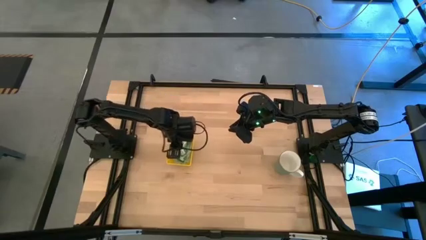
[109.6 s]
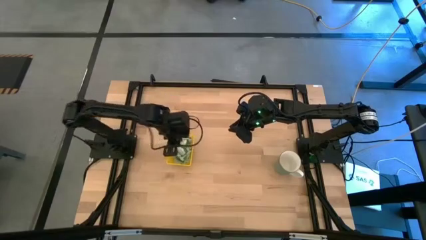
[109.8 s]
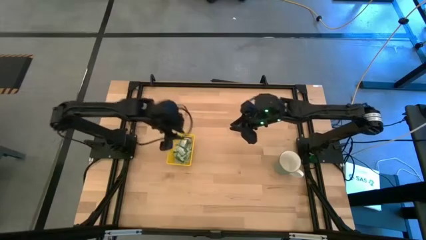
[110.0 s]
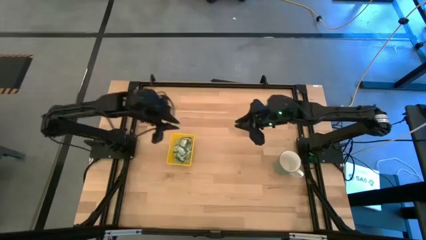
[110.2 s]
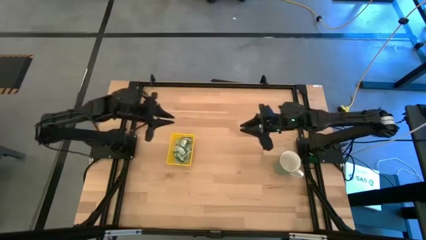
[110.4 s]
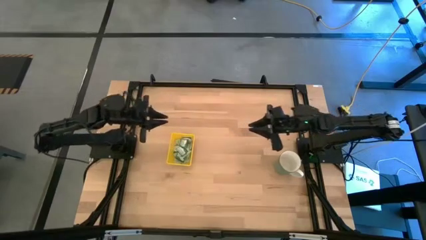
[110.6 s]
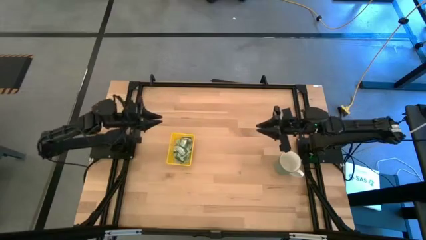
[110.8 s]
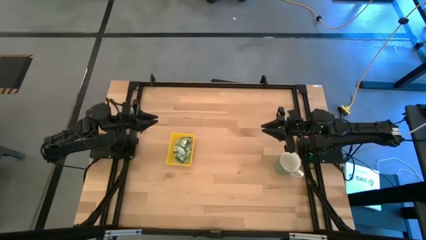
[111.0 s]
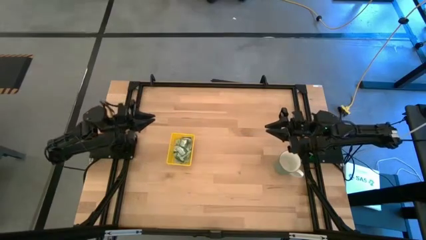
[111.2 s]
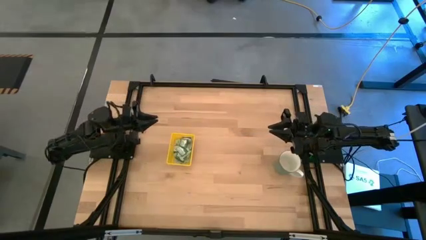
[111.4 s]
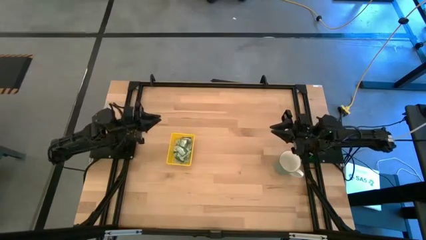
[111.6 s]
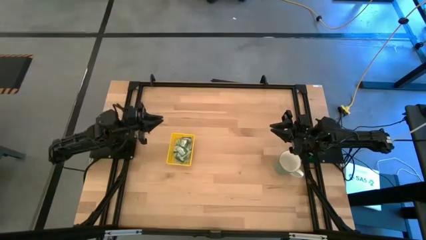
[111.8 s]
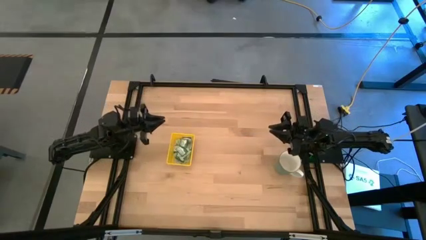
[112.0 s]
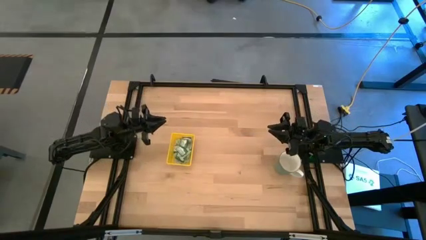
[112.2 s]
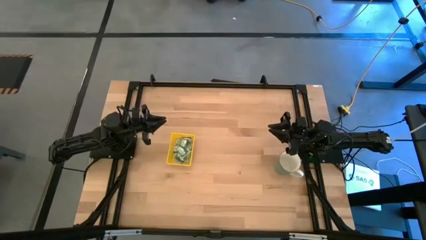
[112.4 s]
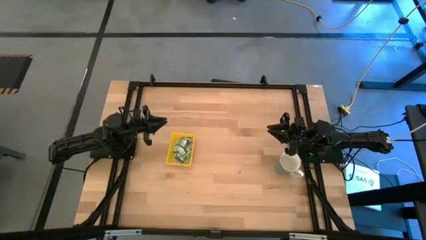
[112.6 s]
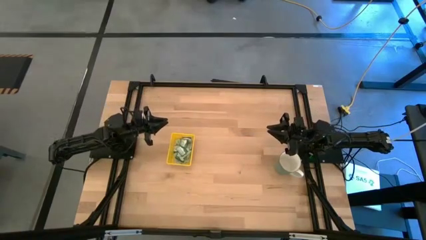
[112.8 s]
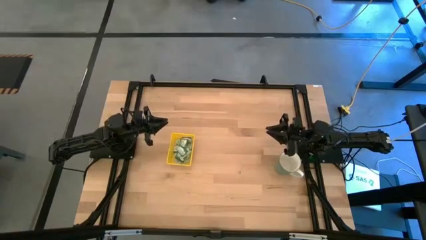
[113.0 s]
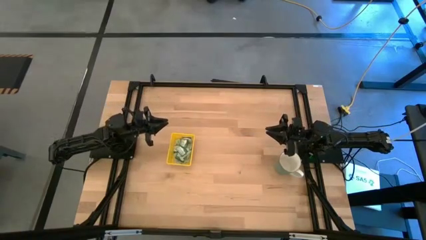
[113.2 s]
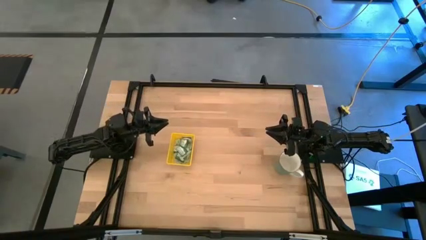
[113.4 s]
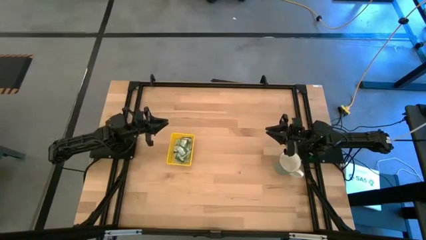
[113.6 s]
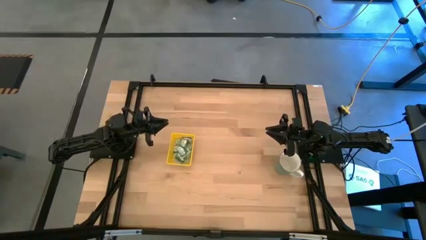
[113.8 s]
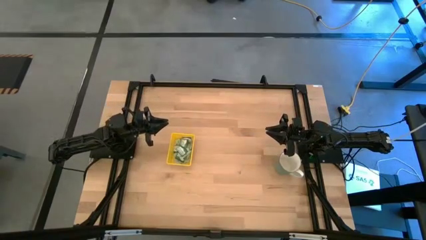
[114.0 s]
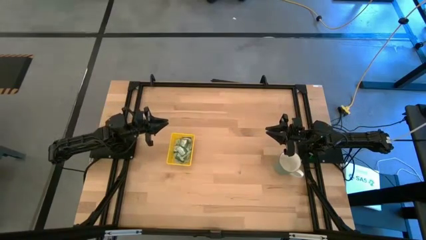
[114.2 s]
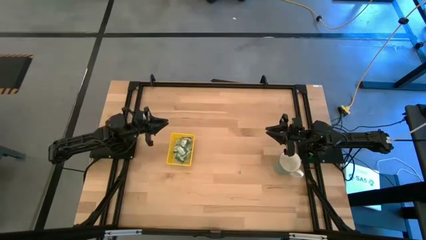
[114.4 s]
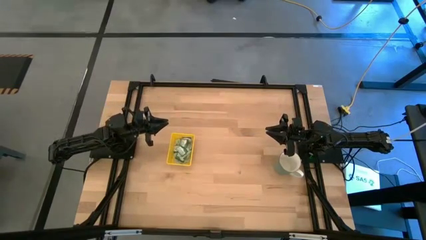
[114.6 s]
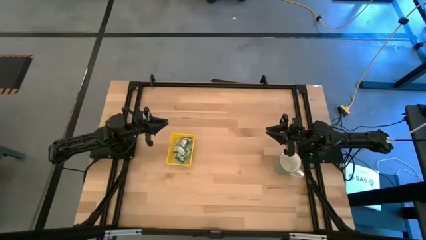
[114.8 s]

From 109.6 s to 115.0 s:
Task: Pick and place Stevia / Truvia into bins
Return to Home Position

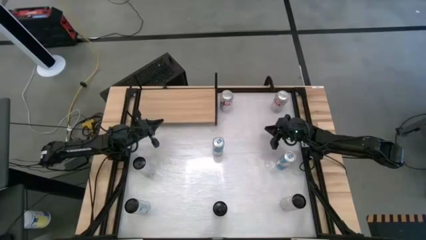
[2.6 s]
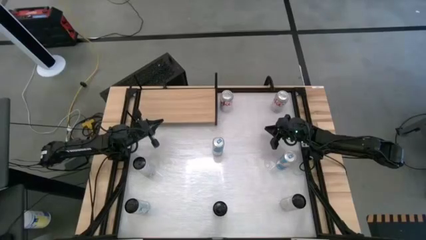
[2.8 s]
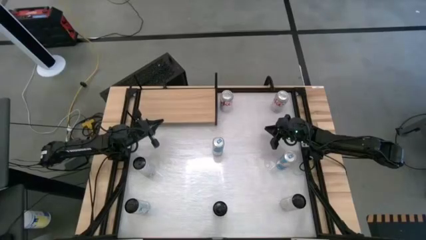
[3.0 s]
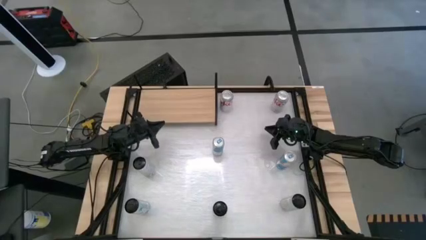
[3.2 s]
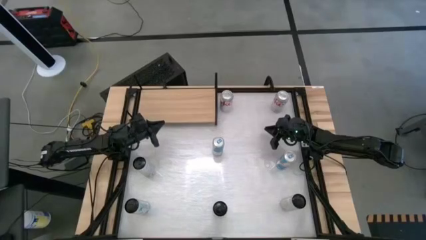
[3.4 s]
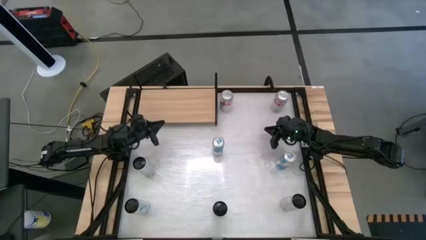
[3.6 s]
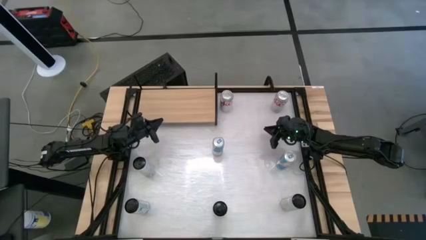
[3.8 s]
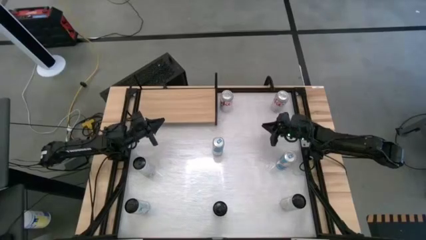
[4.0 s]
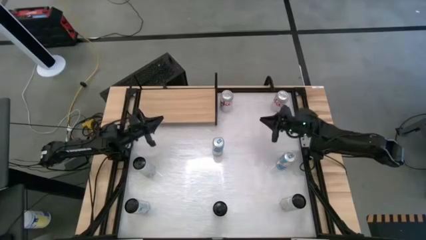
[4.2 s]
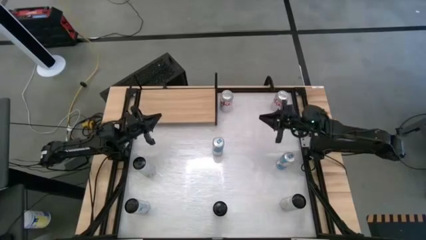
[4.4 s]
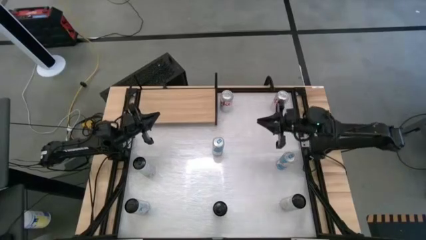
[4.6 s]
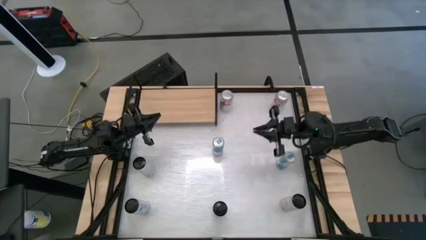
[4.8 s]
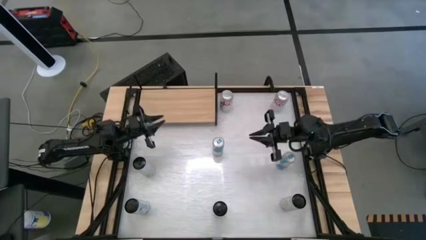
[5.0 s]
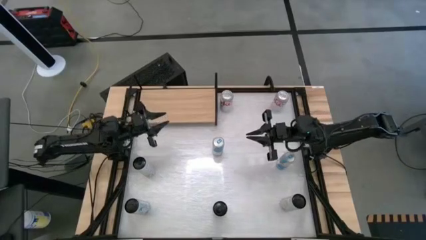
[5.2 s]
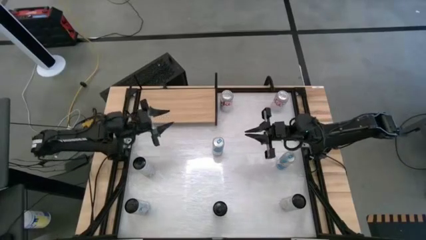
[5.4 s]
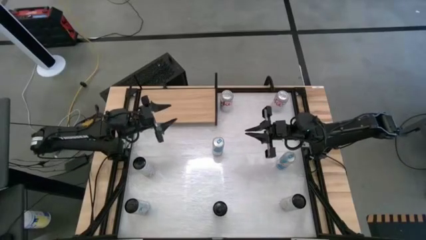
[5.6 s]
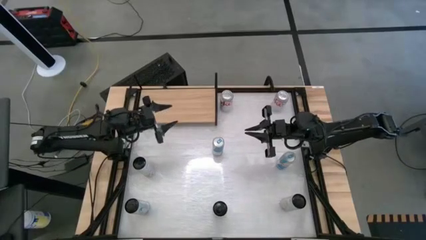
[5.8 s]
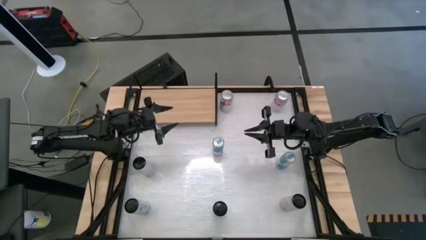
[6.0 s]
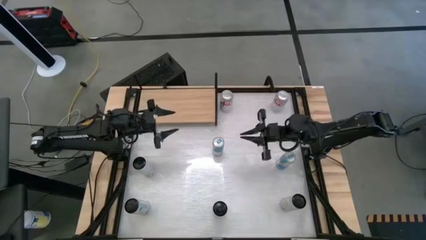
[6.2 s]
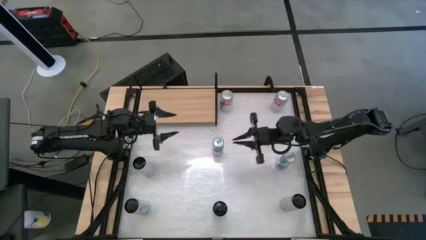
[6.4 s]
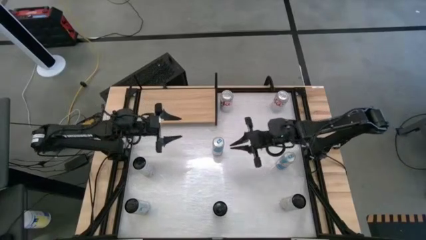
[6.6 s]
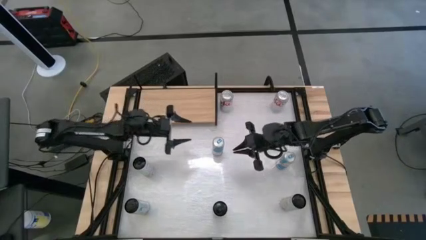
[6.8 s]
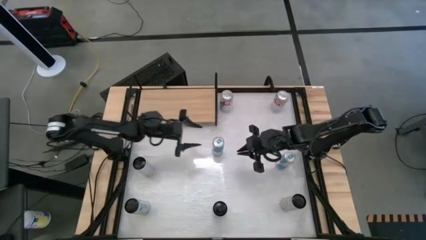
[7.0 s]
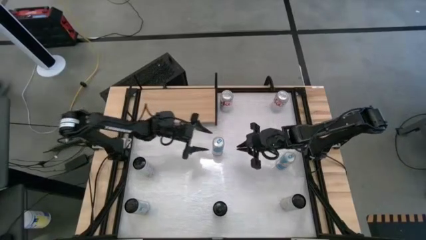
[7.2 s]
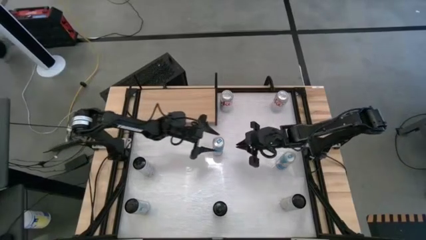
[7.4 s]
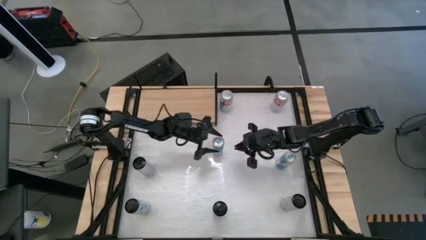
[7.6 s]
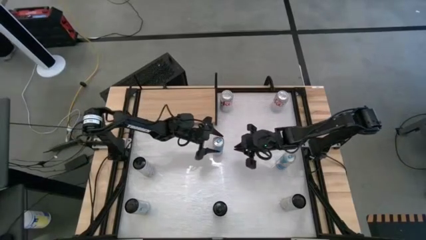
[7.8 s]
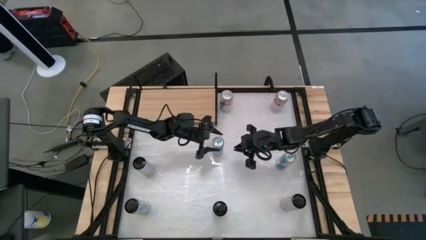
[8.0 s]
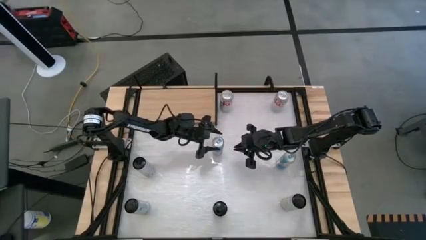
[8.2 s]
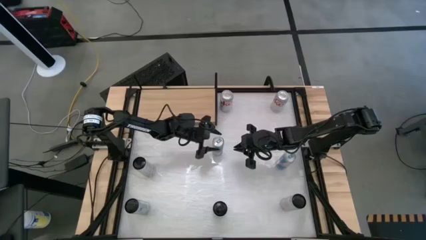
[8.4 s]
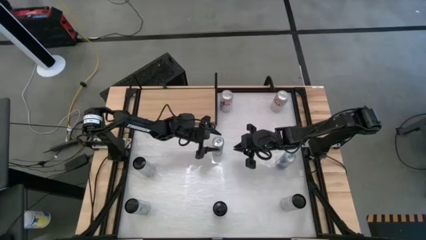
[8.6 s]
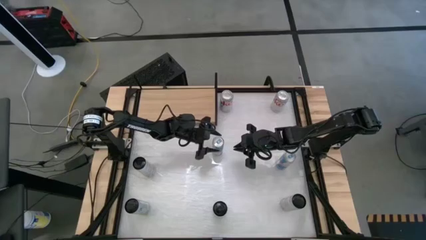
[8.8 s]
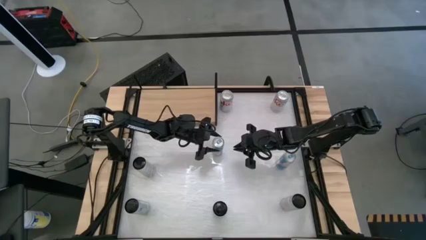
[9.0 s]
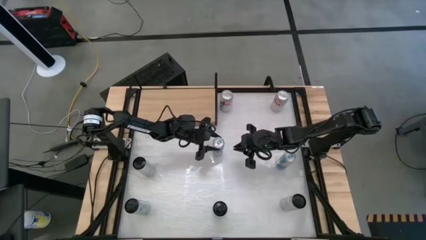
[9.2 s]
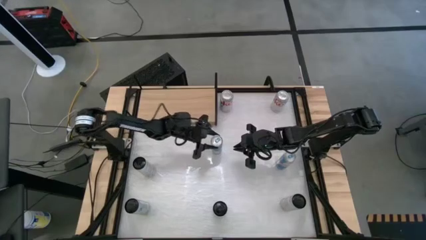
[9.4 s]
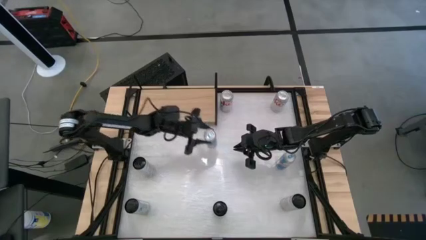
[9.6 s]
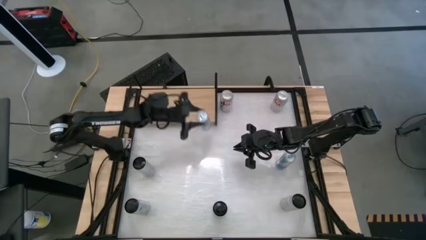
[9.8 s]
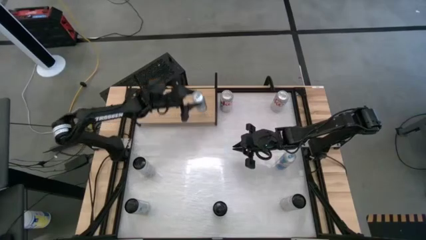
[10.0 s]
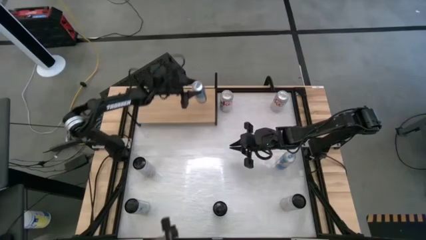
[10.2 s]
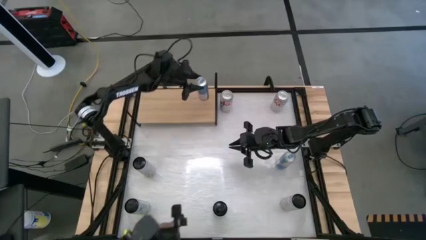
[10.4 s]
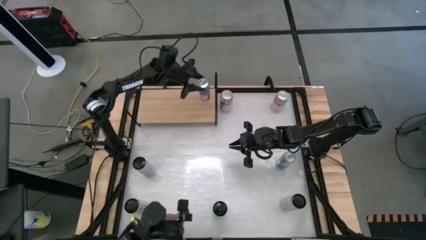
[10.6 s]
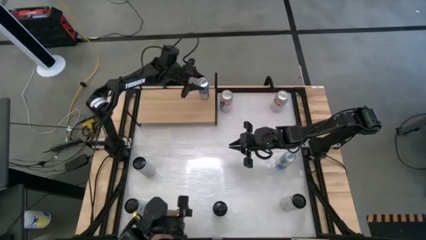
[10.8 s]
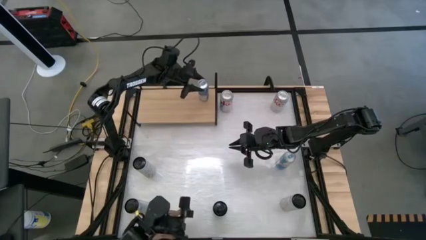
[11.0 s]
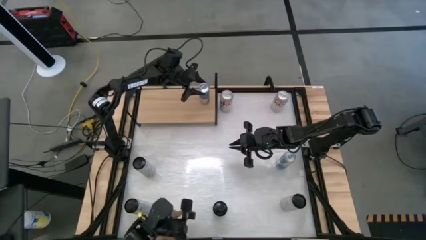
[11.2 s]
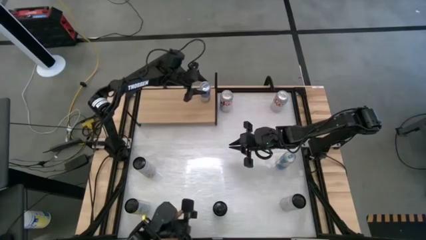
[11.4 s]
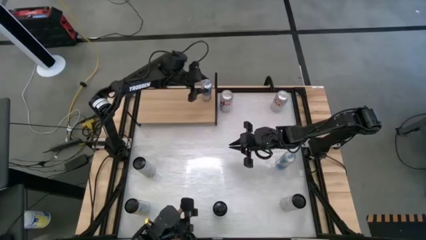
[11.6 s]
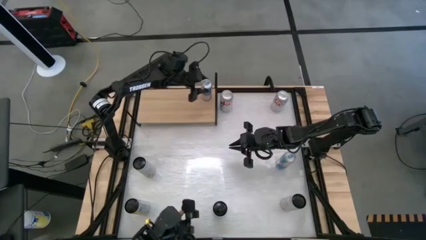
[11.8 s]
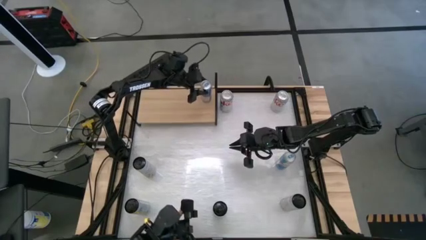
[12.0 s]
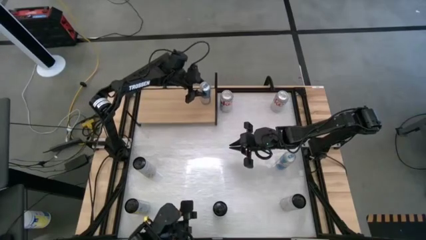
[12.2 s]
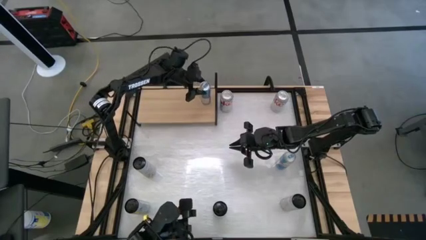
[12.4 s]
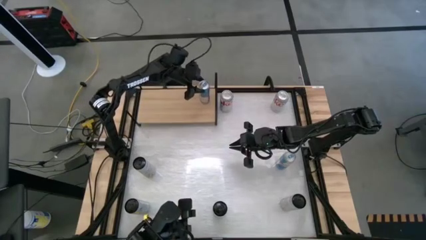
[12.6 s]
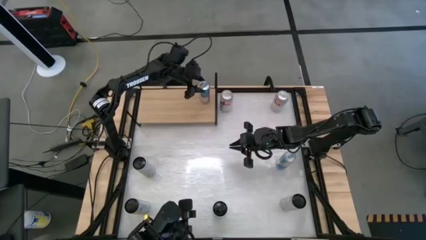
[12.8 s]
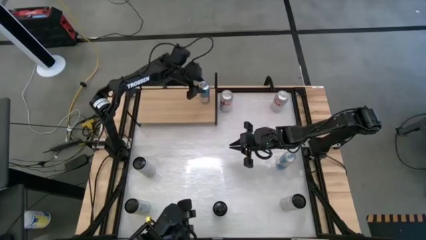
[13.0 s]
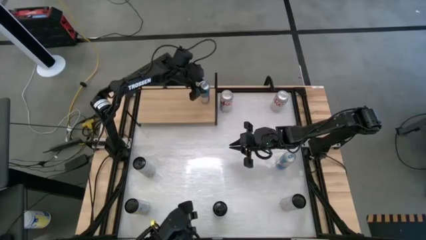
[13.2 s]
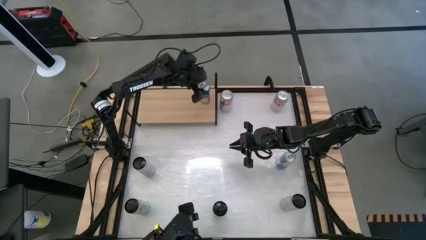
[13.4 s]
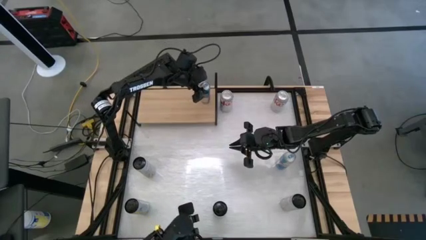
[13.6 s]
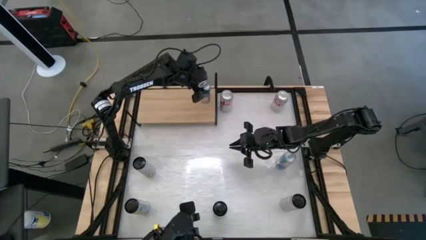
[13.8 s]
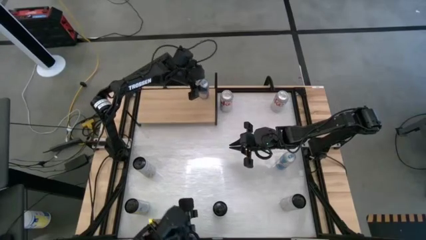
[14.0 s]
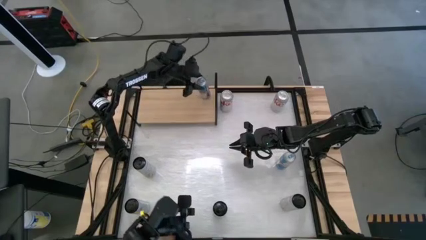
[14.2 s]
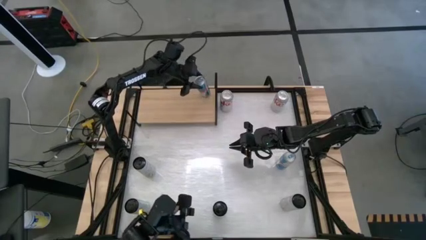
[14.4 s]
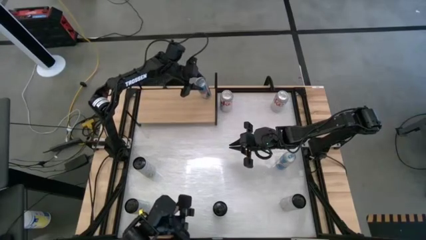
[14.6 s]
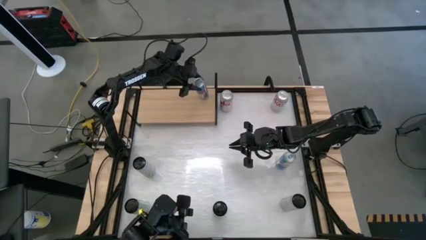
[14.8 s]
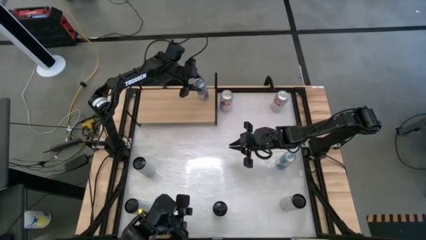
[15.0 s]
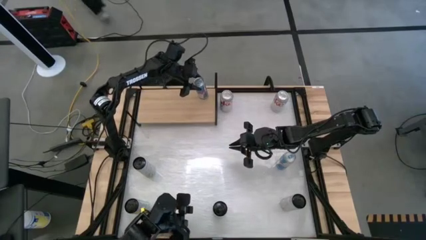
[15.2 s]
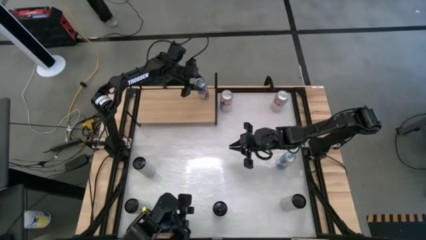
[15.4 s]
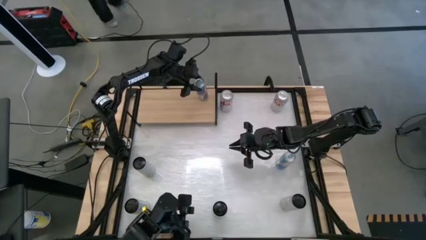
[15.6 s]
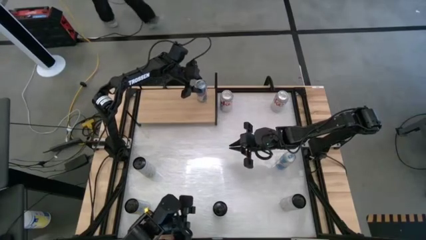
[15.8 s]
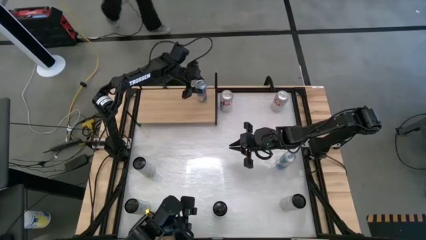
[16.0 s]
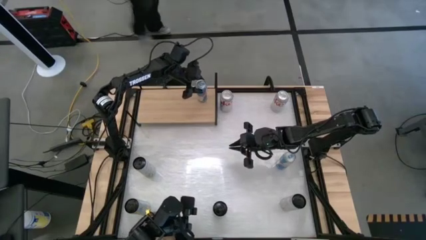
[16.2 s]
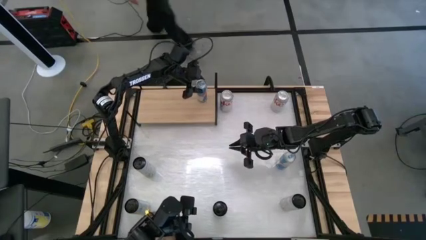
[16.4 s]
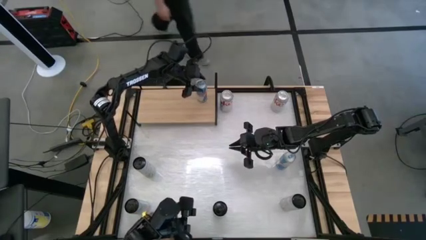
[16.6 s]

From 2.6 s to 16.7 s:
Task: Place canned beverage on shelf
Put the left blue soda can on the shelf
